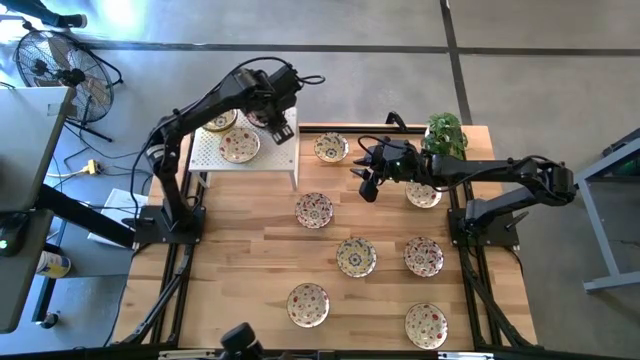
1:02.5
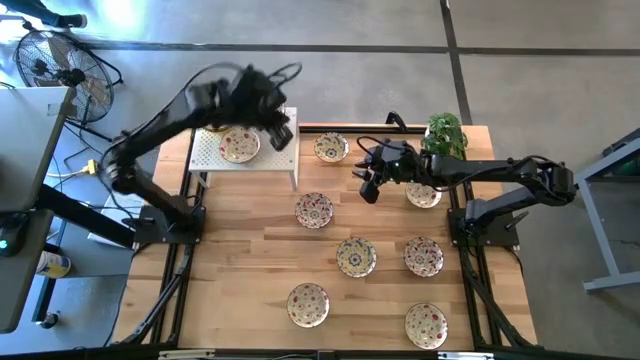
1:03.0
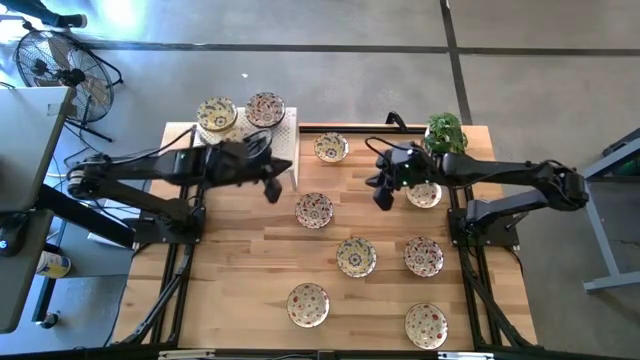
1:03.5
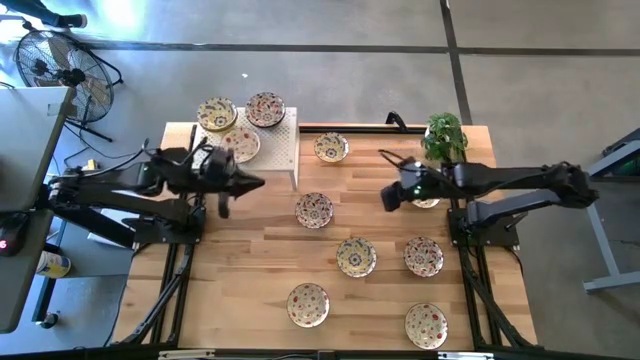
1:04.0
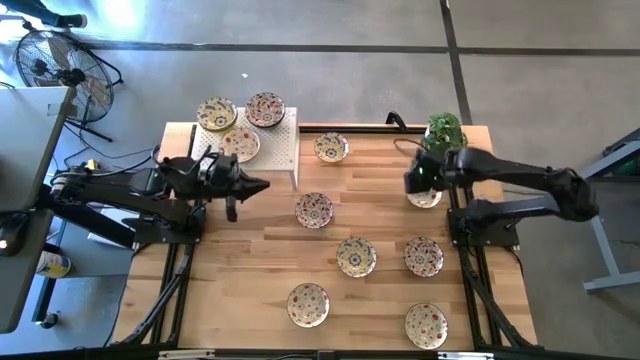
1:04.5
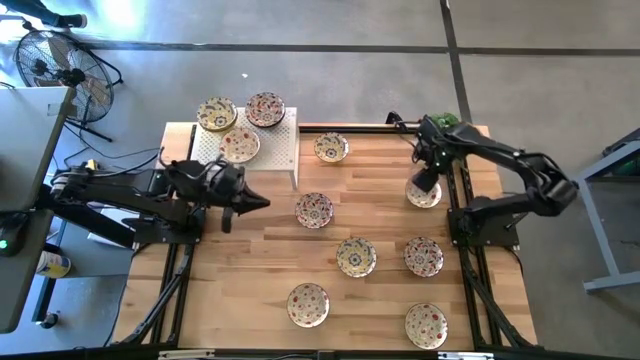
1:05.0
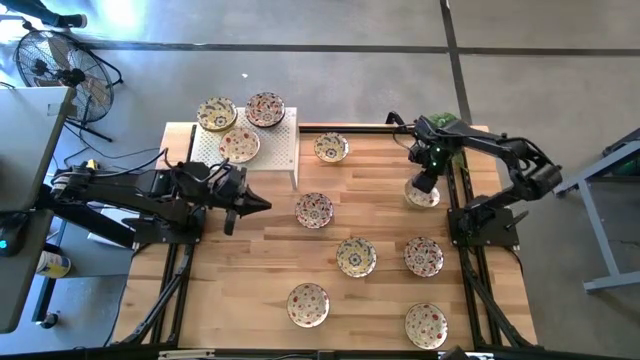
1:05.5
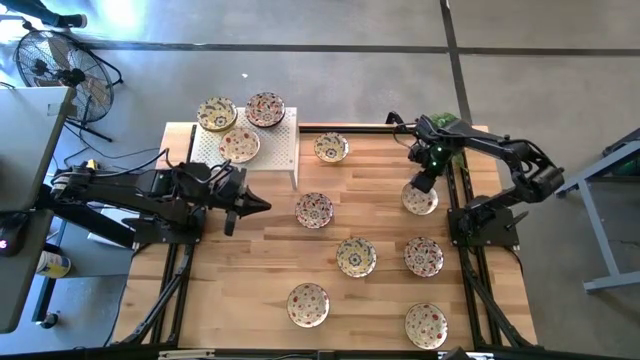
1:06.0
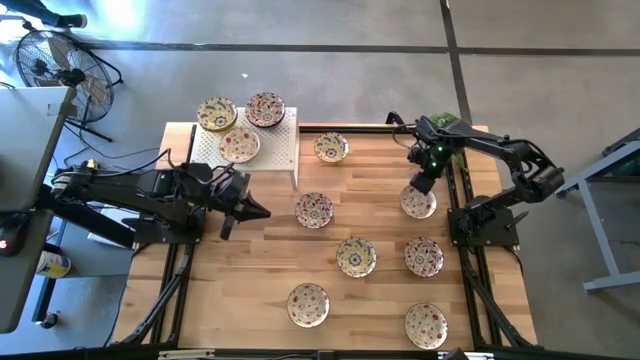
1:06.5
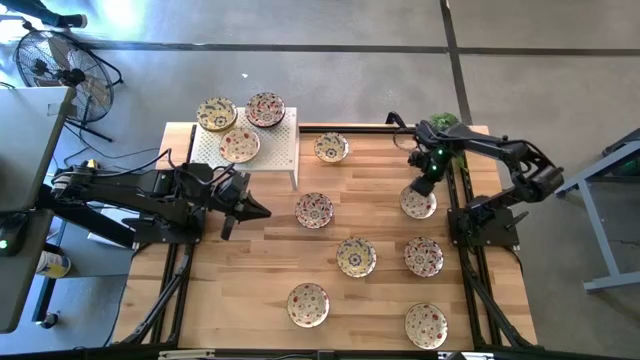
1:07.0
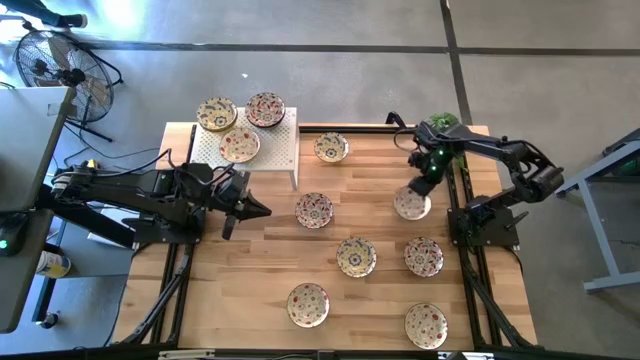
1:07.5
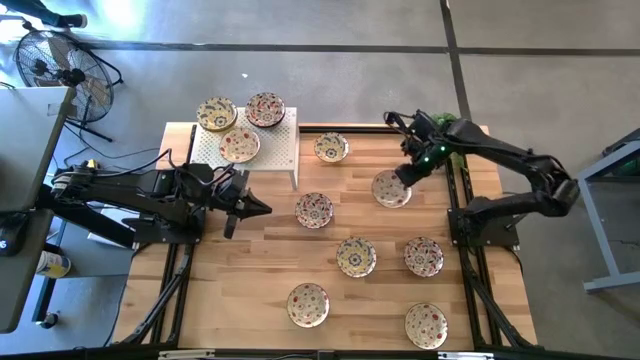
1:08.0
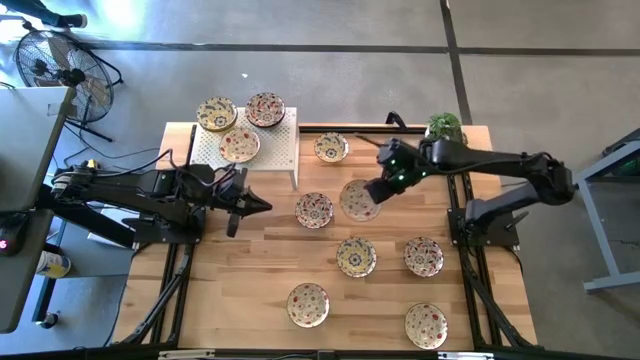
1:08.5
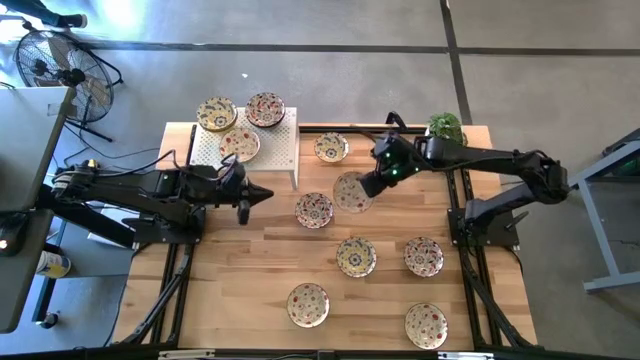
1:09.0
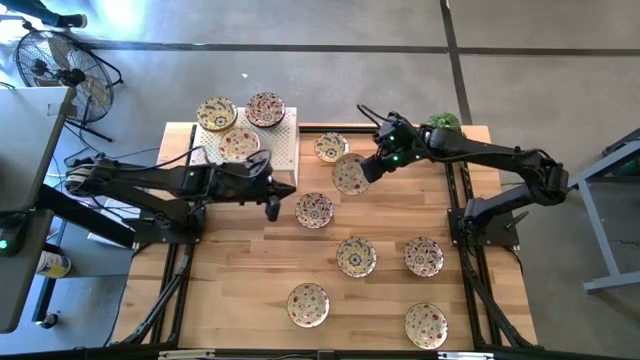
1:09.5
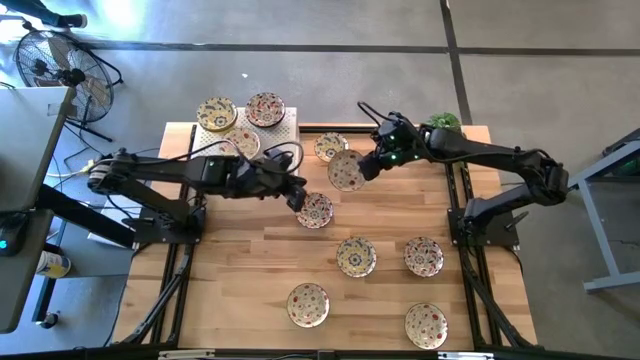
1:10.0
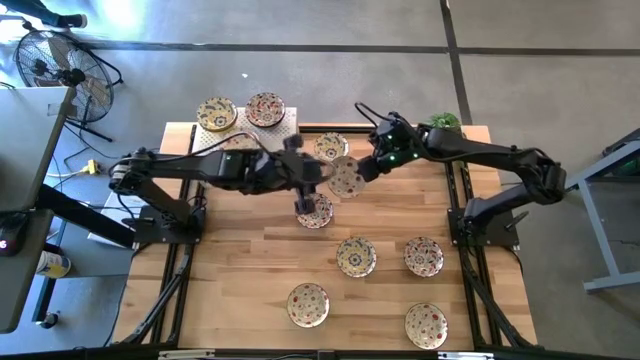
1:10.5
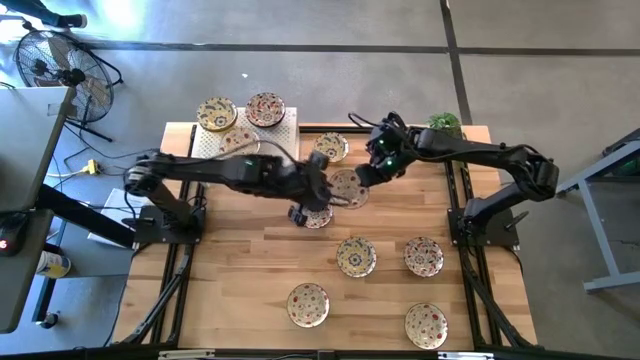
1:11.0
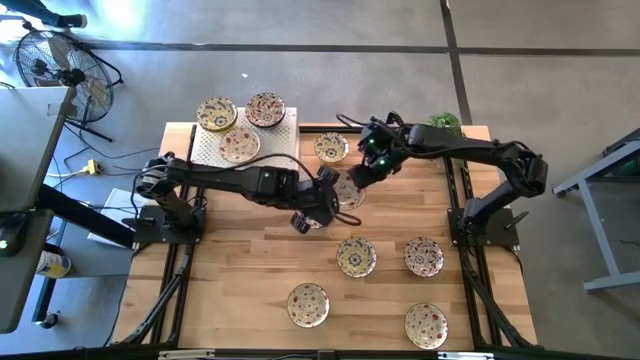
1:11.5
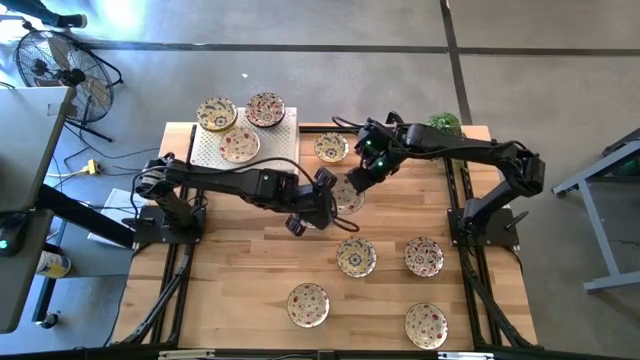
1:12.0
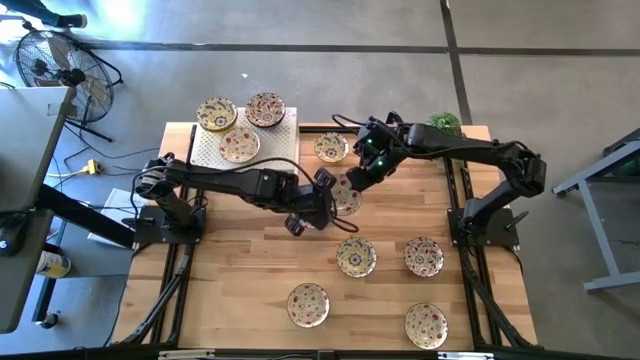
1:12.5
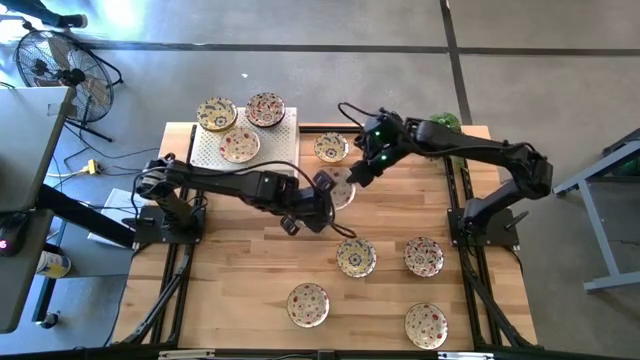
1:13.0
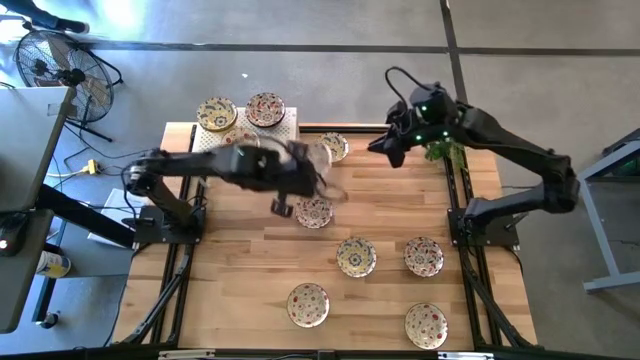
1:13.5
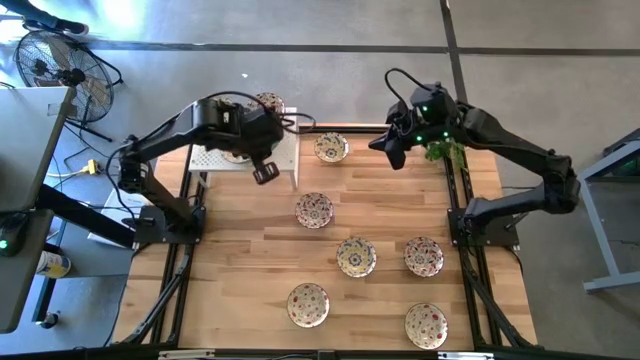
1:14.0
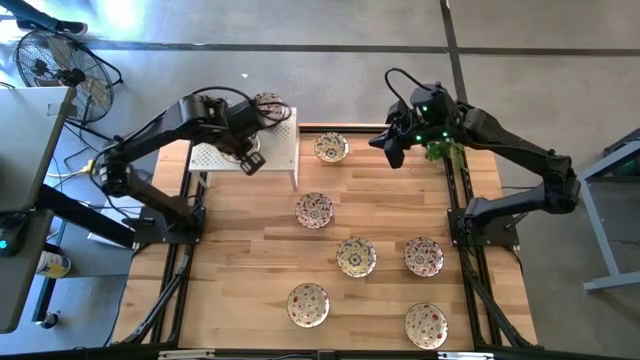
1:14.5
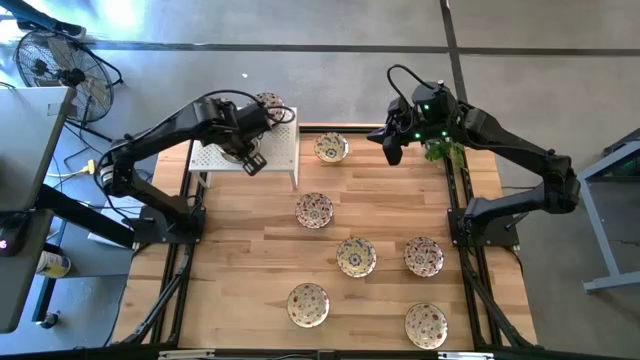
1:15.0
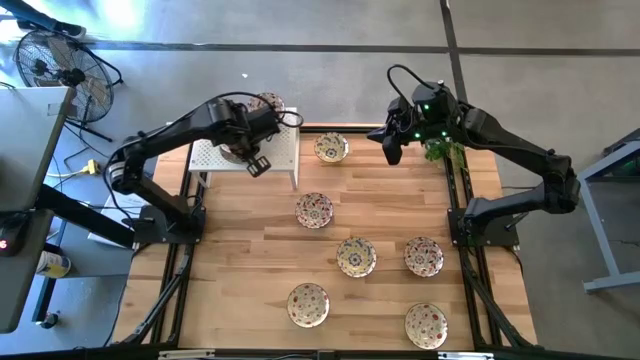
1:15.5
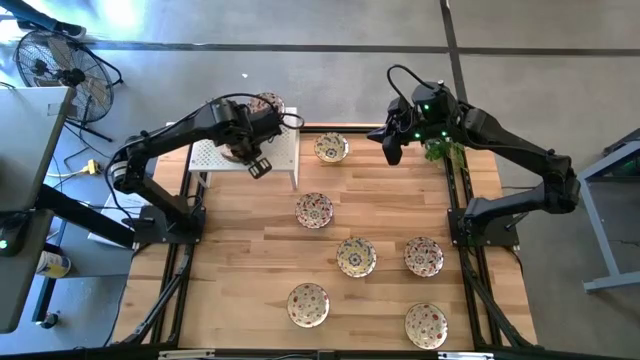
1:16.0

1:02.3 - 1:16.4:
Task: Pick & Place Mini bowls
Stack the green patterned bowl on the green patterned bowl on the shelf

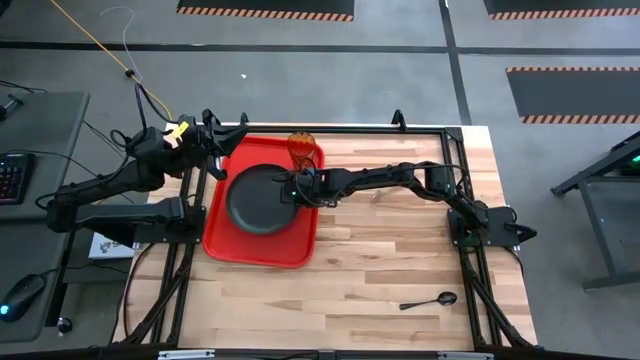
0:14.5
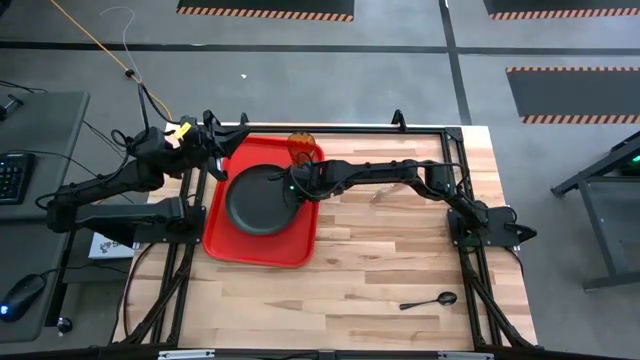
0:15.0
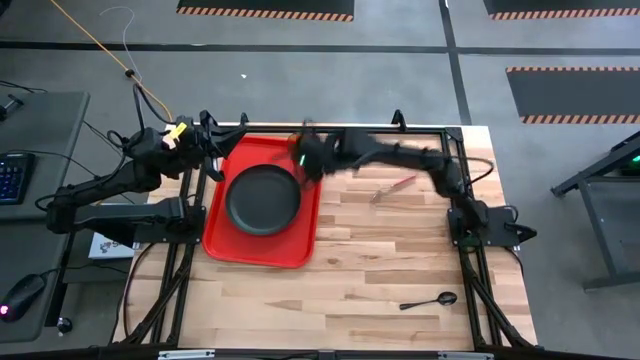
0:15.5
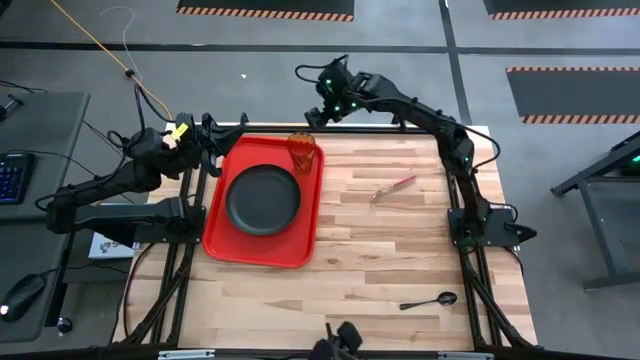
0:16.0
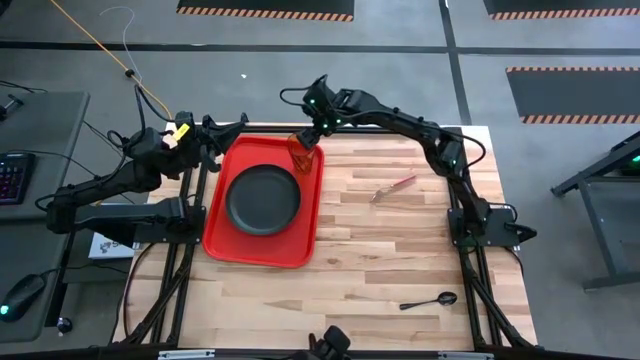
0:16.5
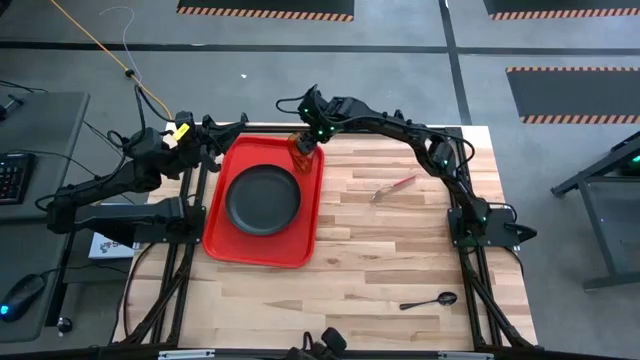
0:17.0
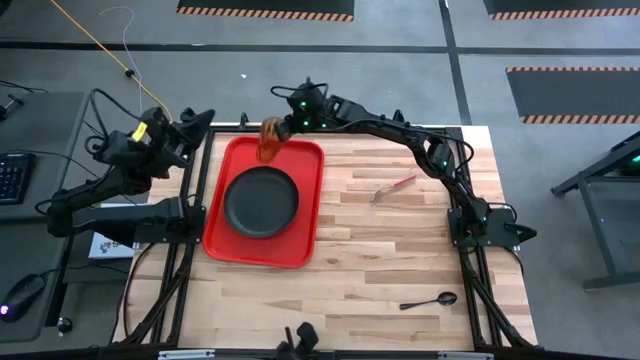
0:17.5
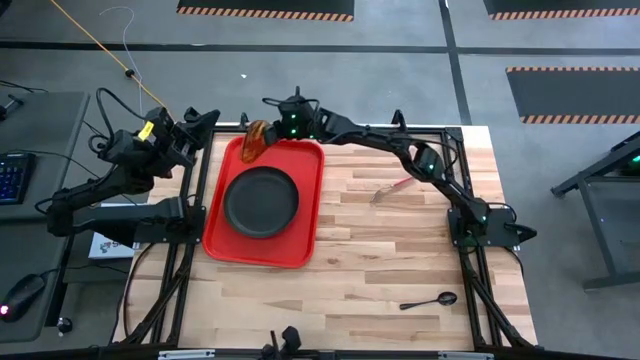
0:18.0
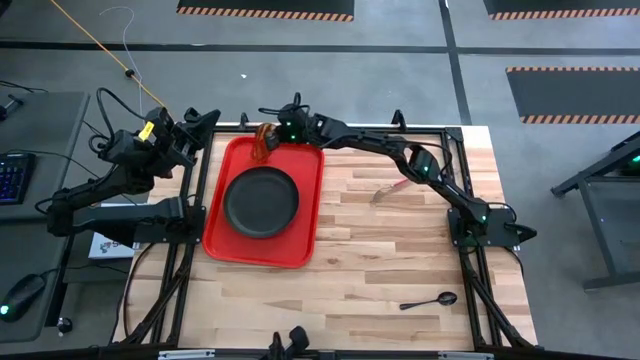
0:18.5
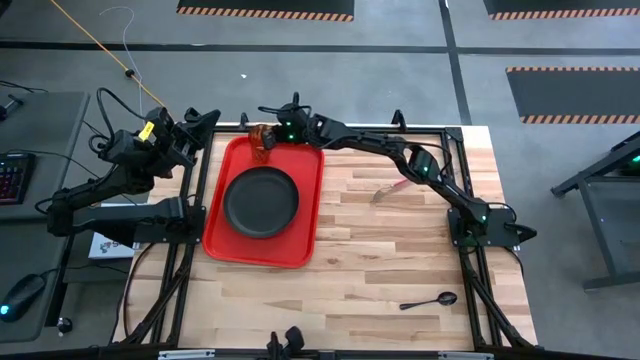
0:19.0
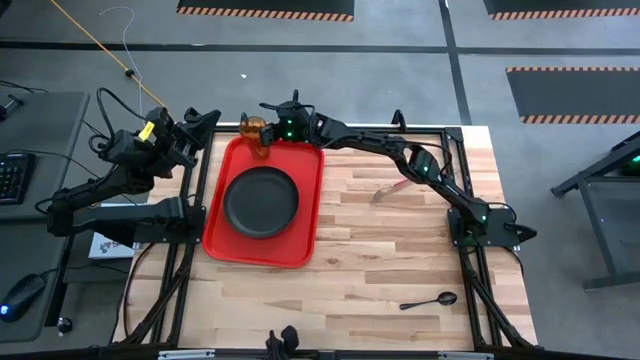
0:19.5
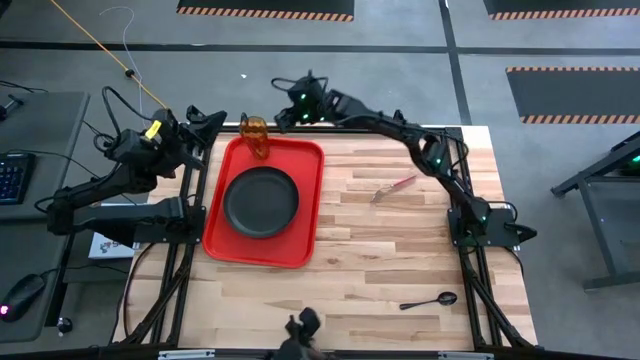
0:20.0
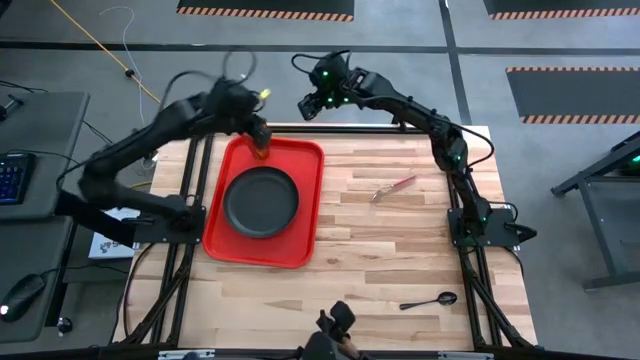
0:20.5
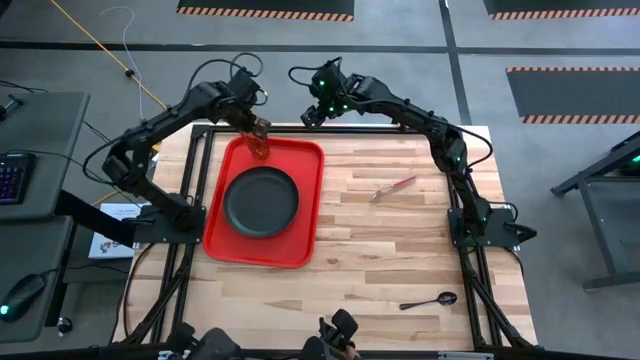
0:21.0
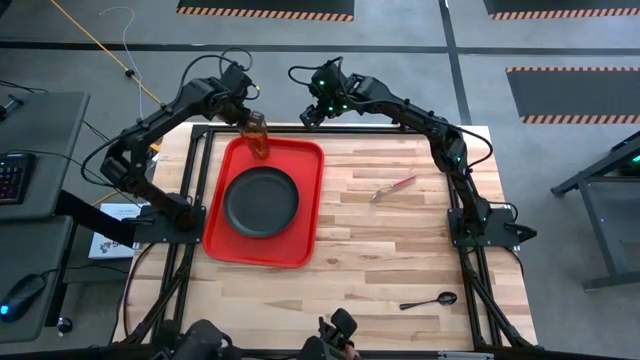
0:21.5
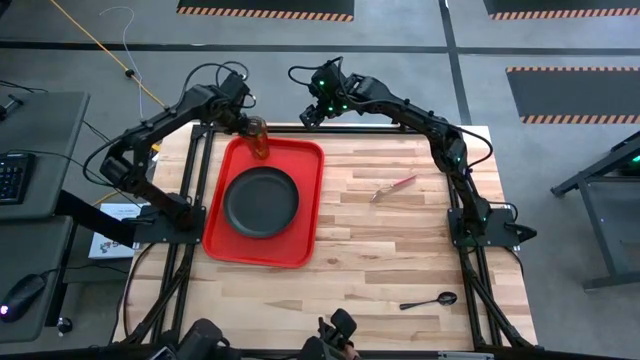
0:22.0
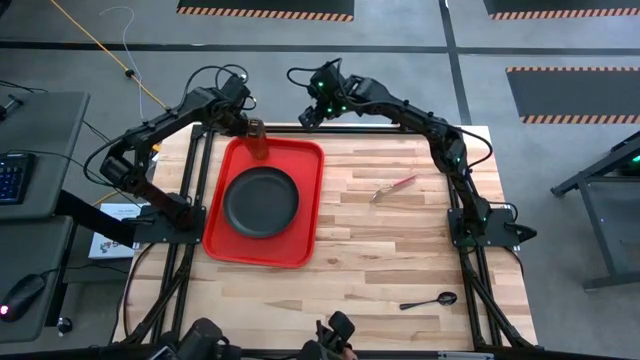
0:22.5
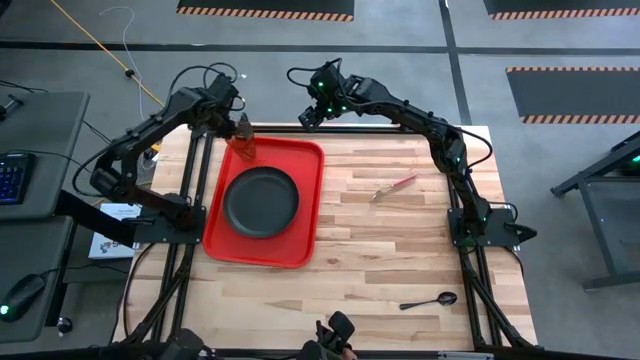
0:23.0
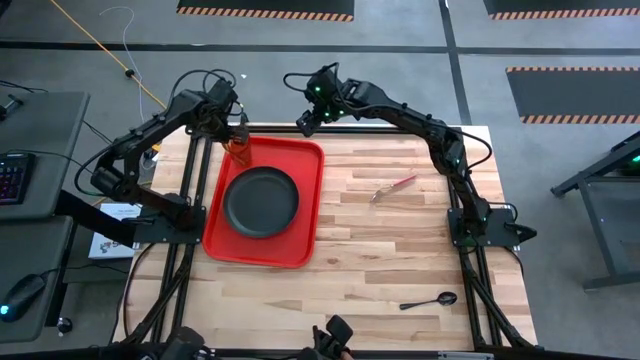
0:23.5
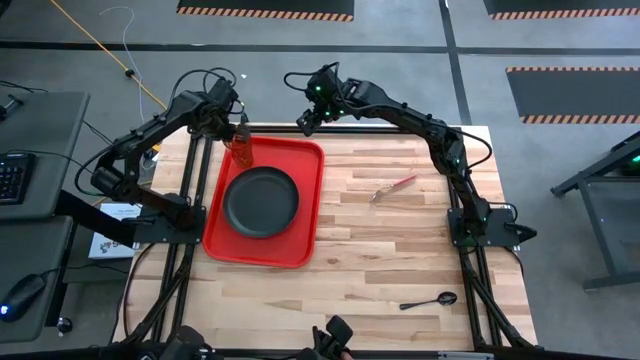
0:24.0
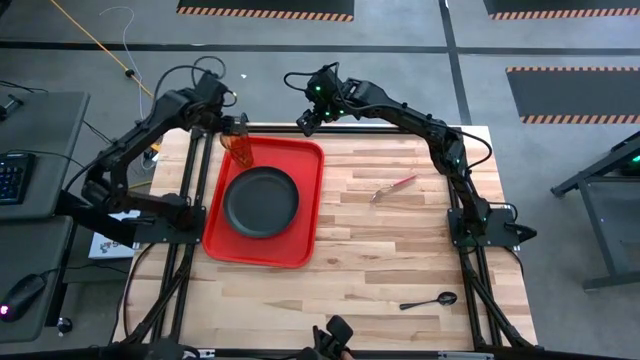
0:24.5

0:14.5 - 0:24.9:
Task: Pick and place plate/cup/fork/spoon on tray
Move the orange cup to the top left of the red tray
